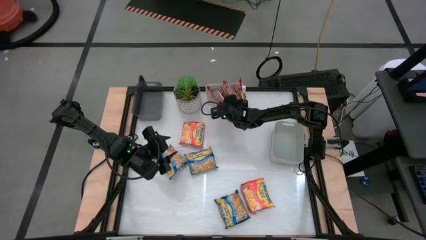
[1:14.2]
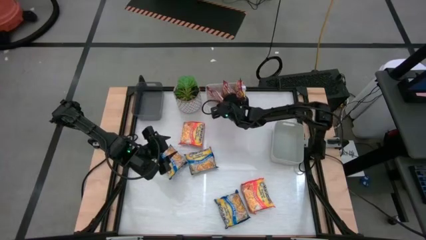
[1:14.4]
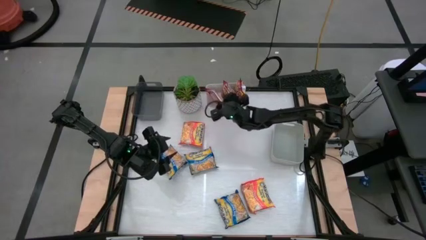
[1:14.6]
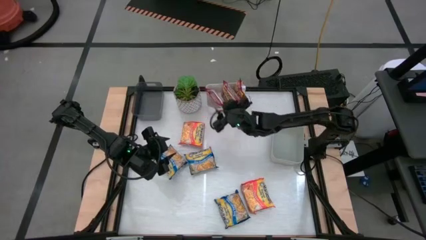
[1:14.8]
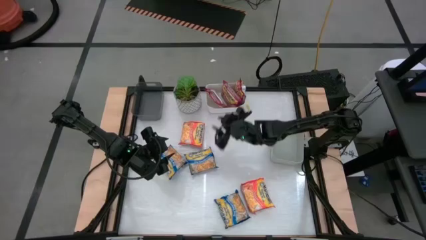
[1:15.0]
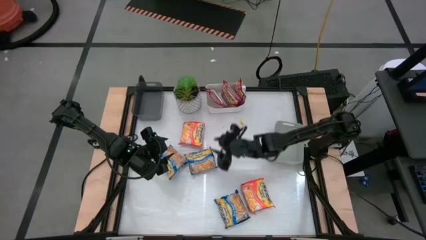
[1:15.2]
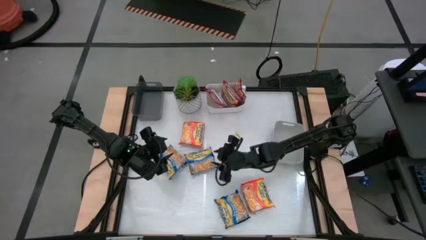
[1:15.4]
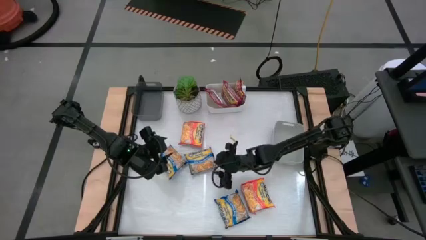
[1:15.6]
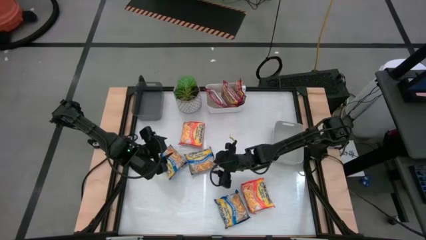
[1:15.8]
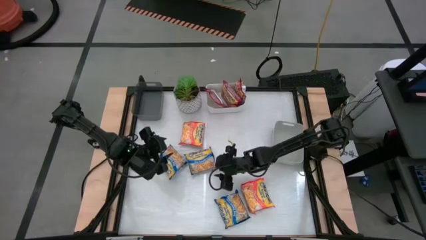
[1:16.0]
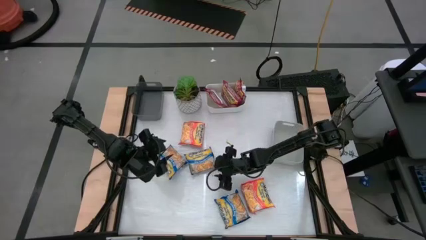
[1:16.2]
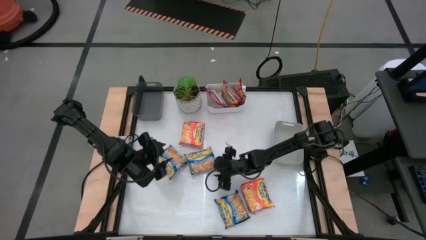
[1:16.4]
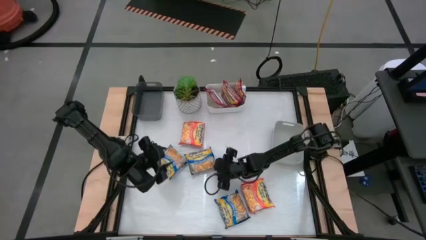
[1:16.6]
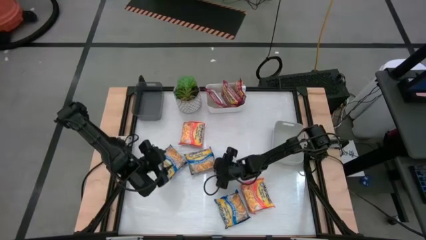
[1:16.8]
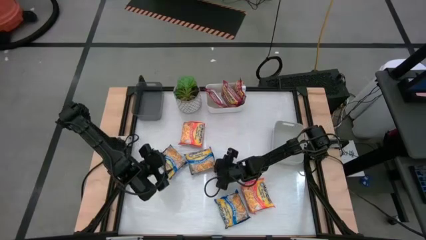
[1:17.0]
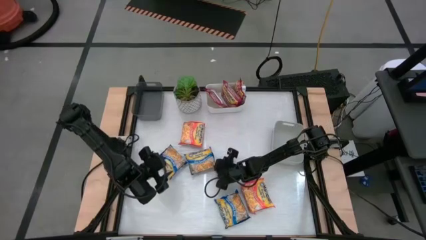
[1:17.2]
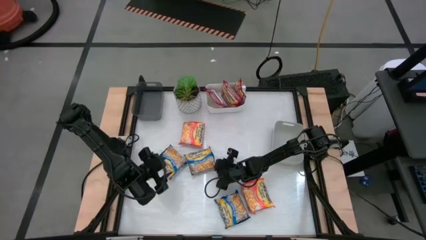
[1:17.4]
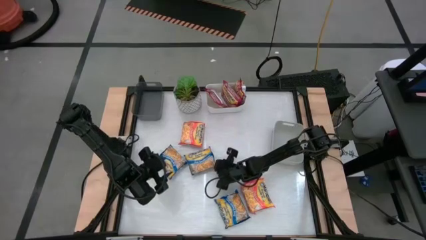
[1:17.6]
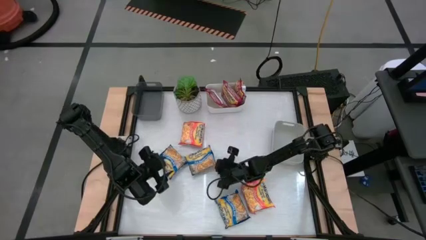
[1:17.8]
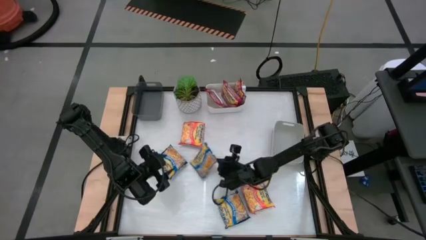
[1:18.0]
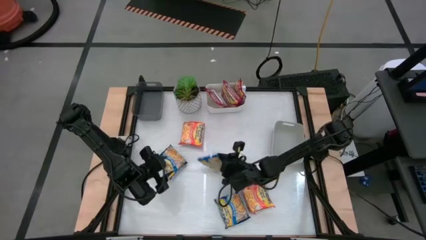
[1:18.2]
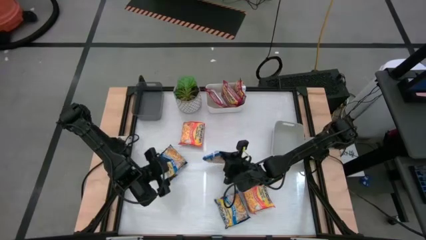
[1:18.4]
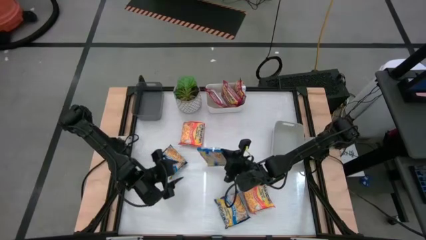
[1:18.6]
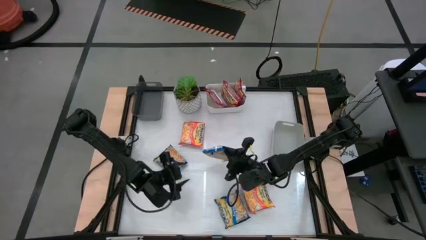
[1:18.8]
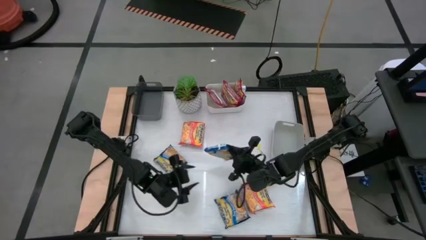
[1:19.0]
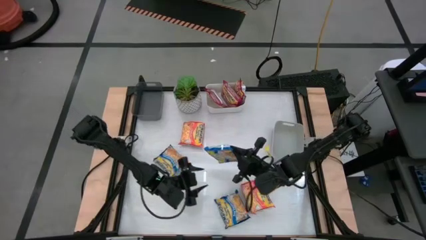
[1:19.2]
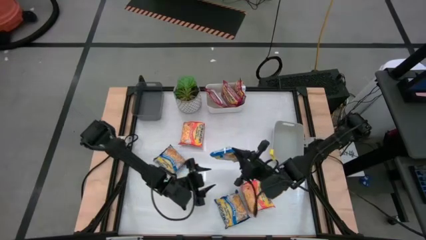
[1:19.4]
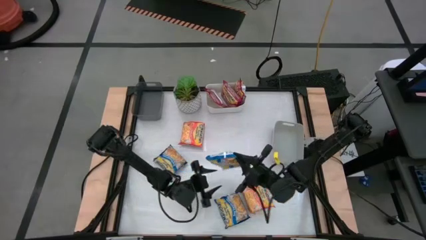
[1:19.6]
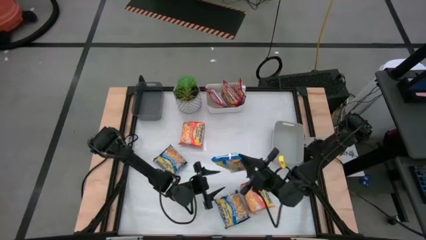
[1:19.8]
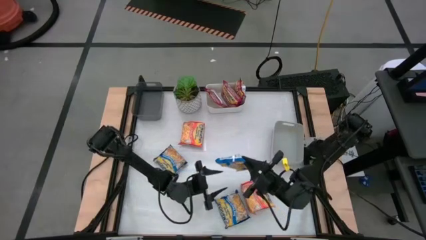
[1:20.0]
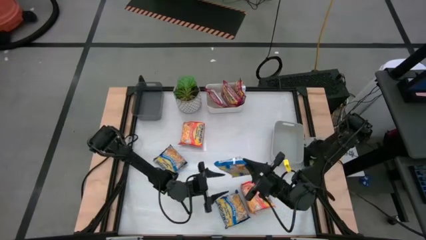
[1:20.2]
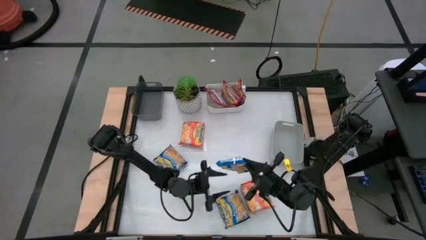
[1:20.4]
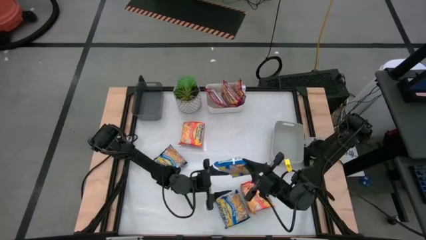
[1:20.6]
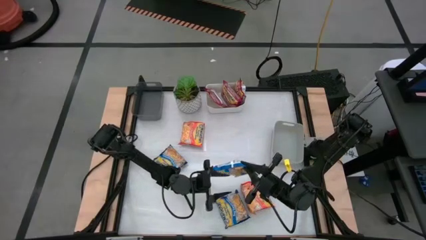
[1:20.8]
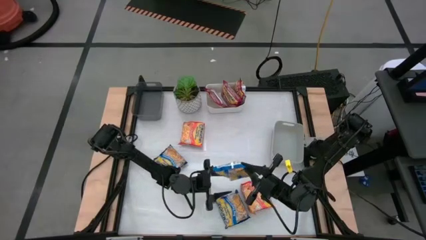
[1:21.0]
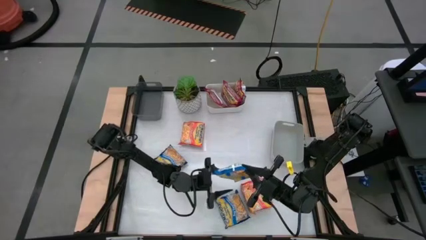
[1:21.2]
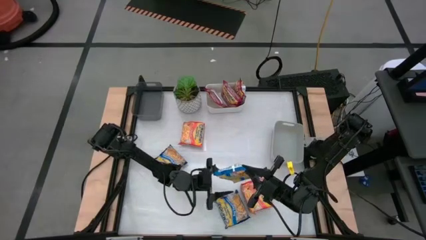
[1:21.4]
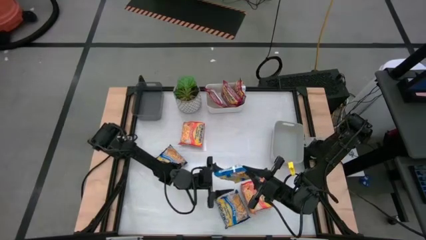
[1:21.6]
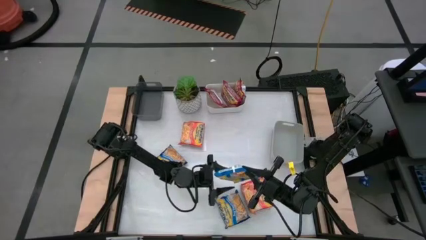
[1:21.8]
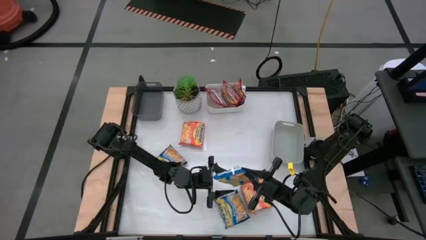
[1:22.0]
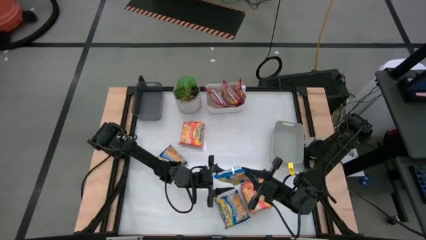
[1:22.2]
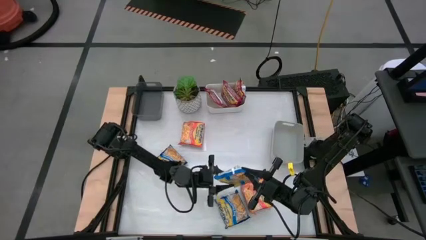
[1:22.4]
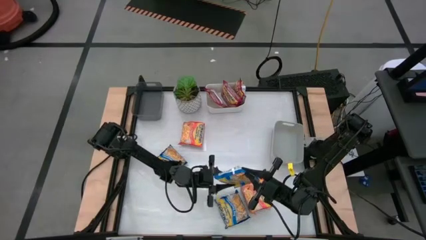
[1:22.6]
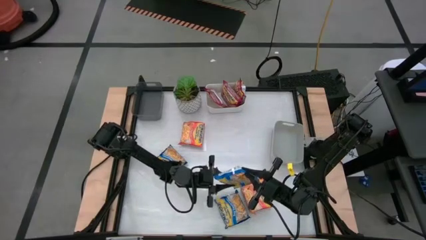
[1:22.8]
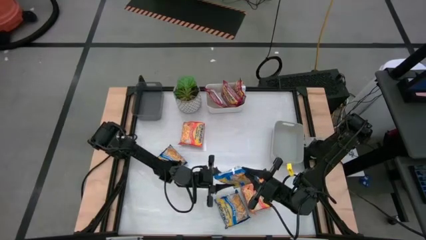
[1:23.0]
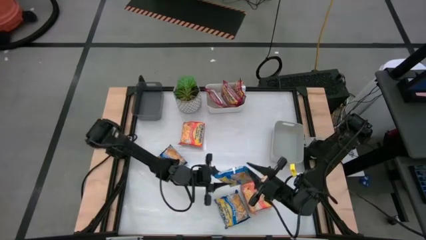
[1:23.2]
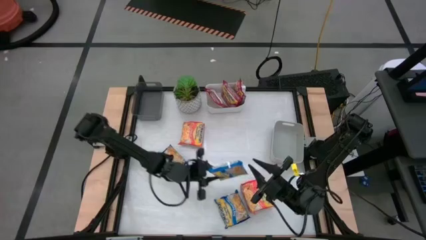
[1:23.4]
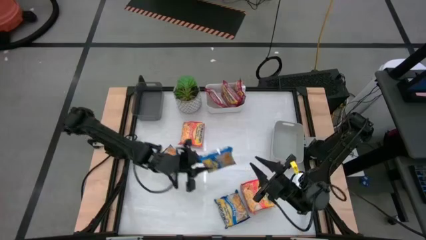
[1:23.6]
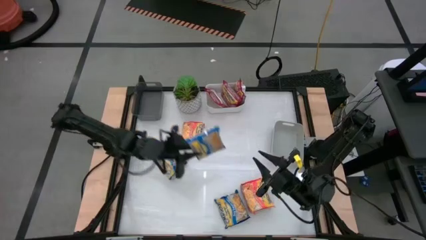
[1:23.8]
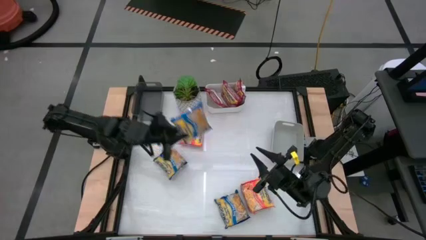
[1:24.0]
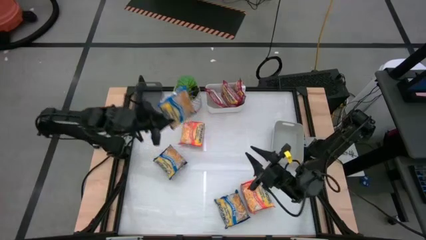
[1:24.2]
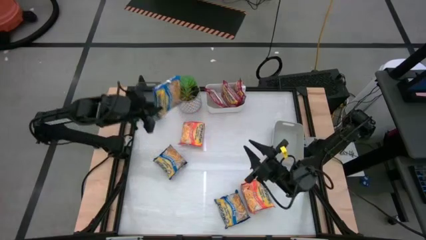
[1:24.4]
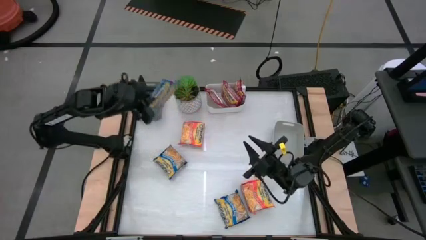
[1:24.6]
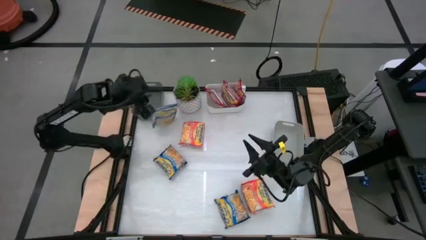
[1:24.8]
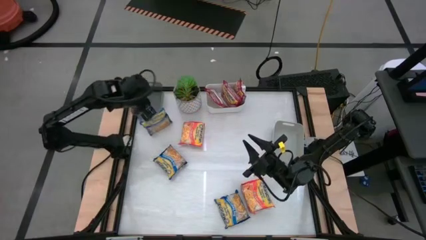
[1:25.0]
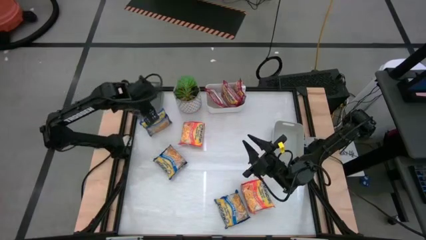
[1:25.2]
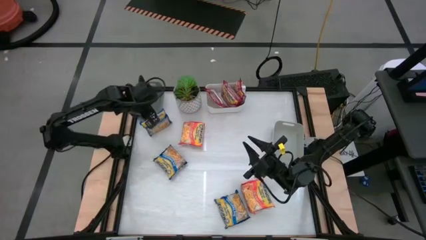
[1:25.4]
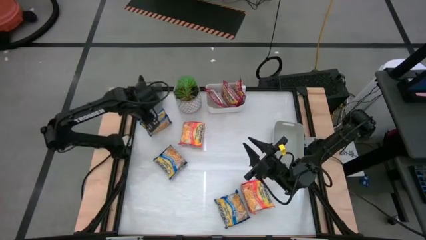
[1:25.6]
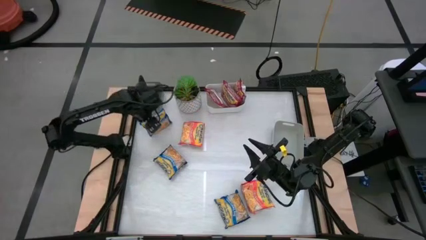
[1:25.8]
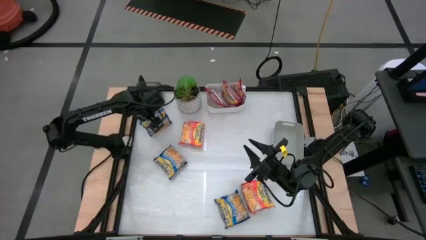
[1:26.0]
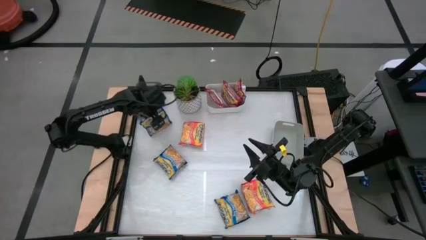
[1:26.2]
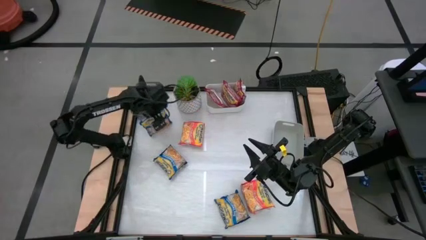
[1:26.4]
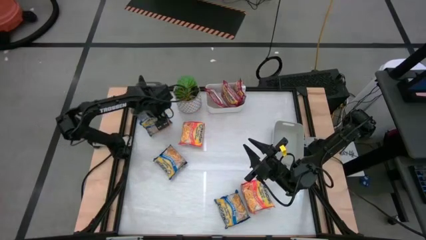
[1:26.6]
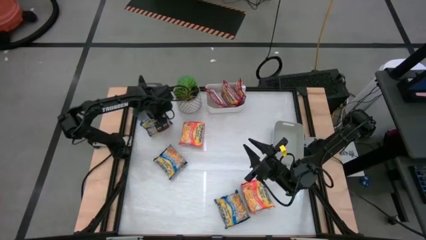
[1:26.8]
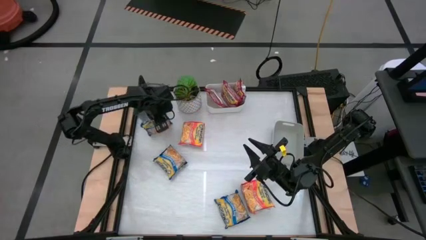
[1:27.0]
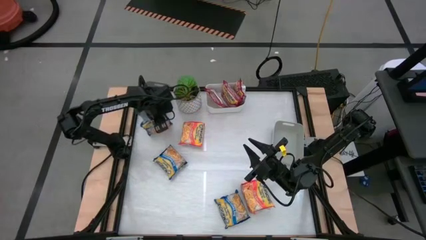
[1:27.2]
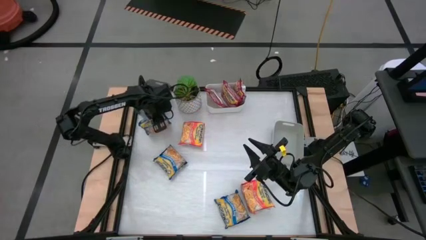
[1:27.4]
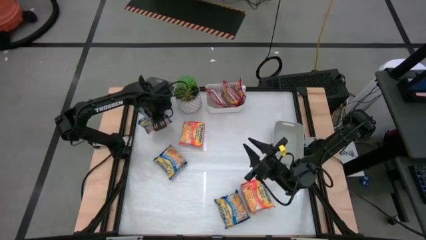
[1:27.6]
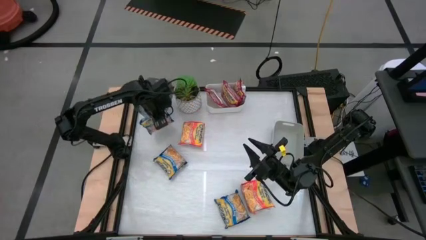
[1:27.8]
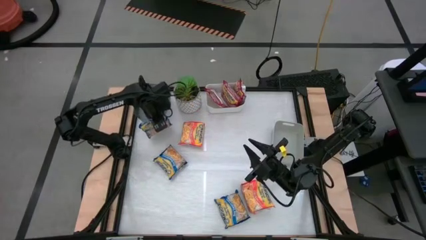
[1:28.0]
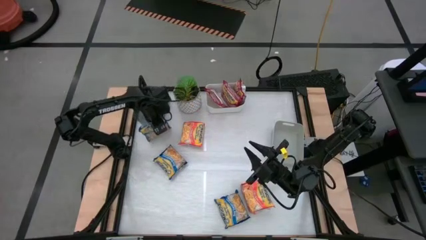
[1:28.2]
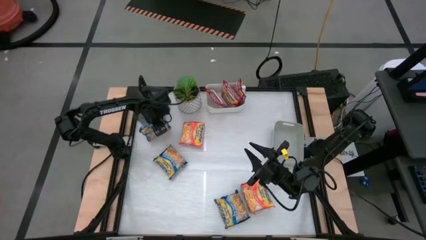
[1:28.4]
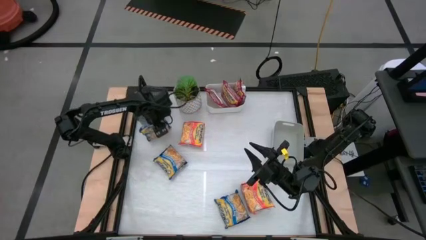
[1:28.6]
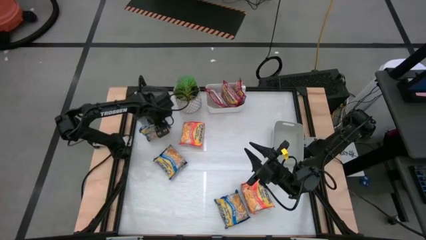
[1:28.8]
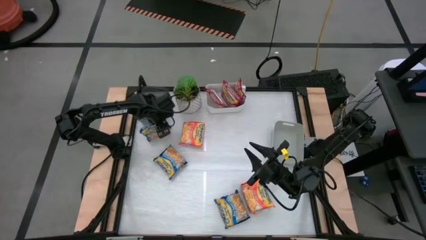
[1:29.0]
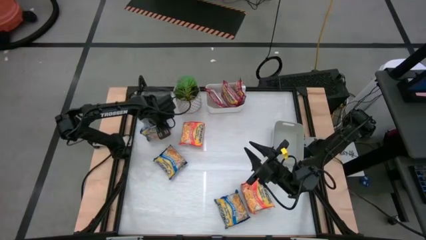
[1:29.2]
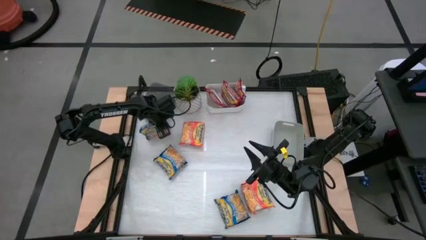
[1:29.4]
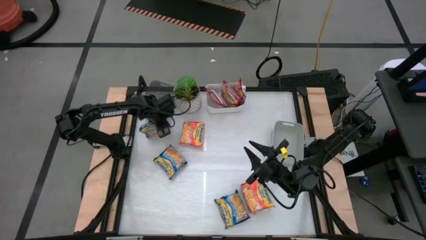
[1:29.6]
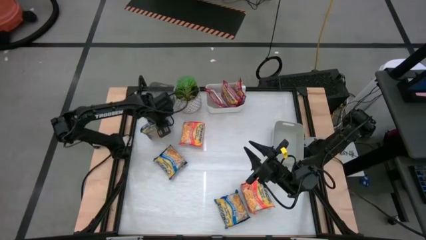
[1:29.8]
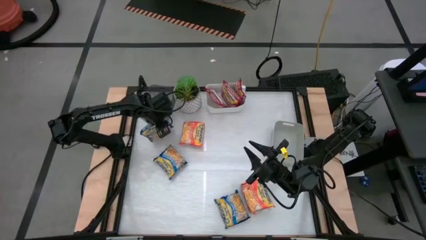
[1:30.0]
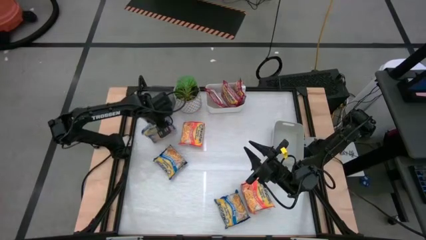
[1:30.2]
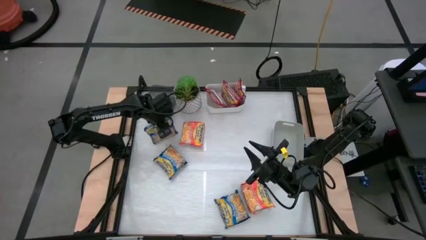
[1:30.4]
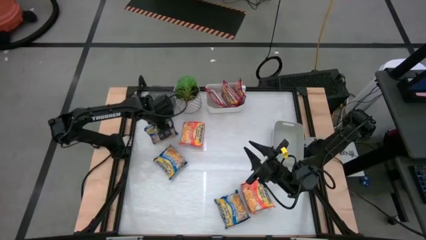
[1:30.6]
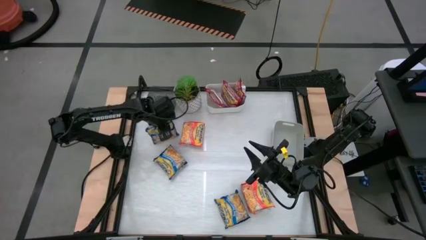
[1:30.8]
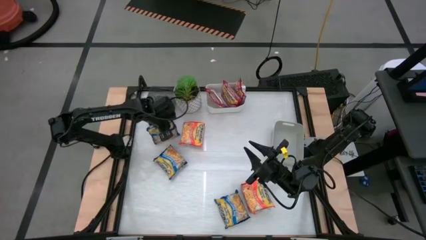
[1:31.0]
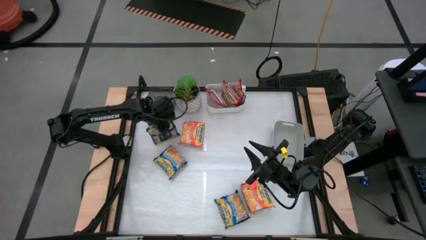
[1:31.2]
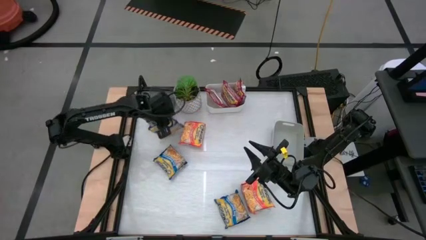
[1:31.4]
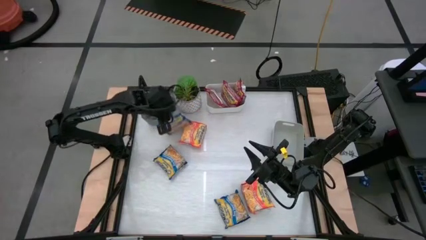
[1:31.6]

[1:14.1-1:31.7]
Task: Sort Maruchan noodles
Put the middle blue noodle pack into the black bin
